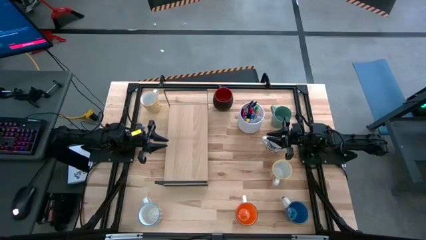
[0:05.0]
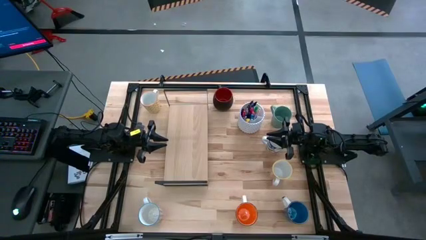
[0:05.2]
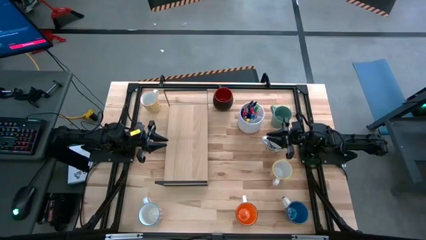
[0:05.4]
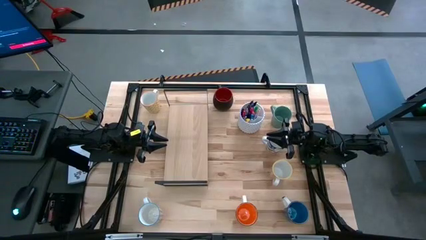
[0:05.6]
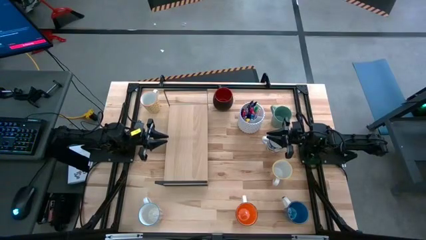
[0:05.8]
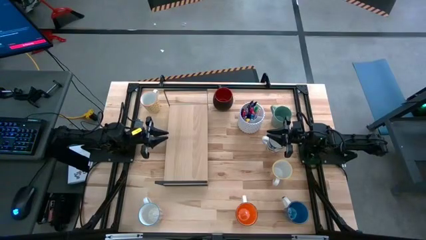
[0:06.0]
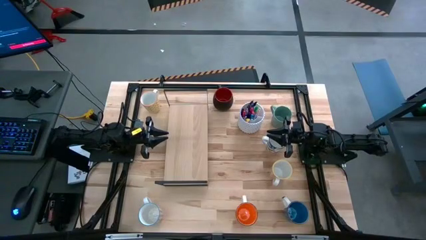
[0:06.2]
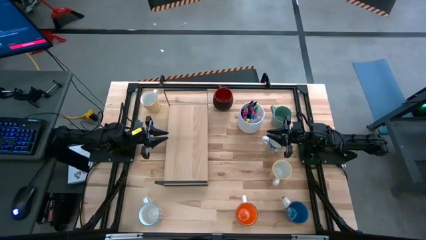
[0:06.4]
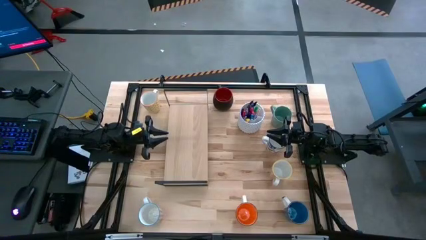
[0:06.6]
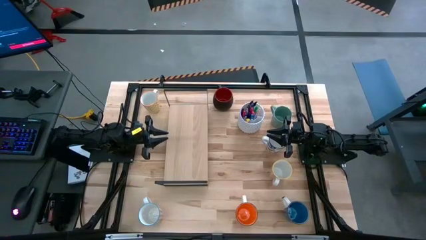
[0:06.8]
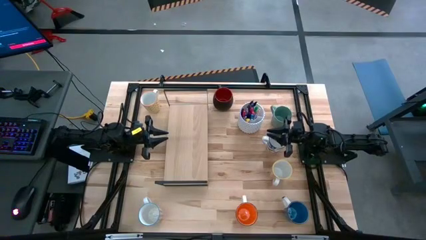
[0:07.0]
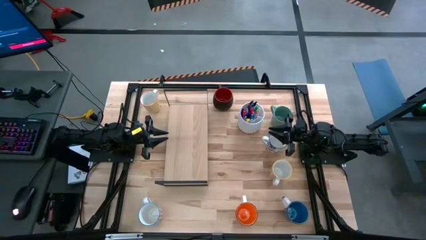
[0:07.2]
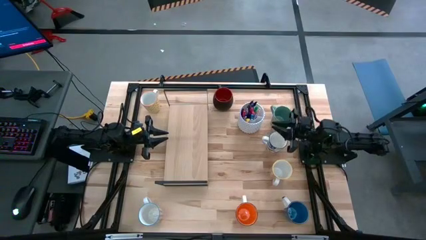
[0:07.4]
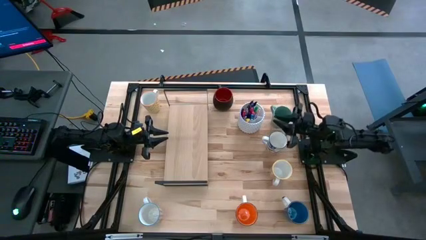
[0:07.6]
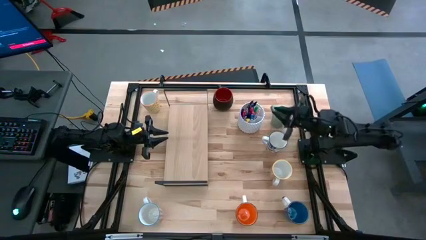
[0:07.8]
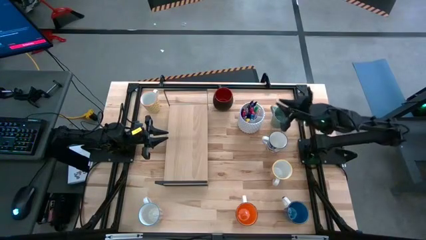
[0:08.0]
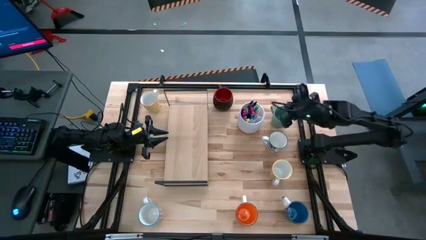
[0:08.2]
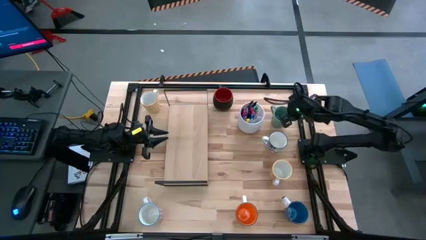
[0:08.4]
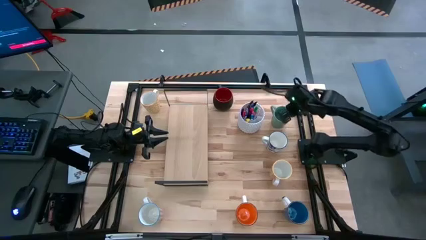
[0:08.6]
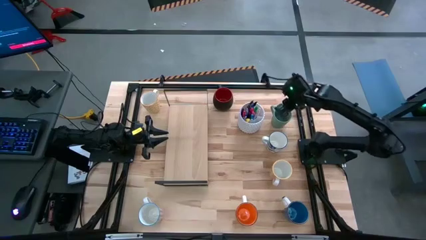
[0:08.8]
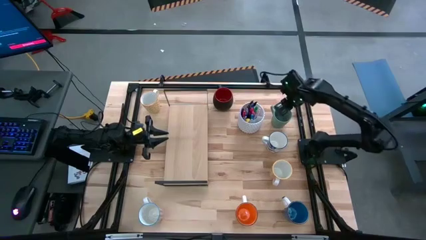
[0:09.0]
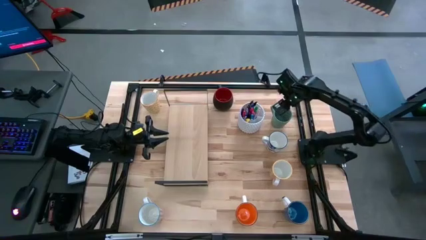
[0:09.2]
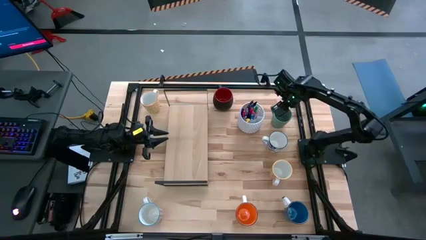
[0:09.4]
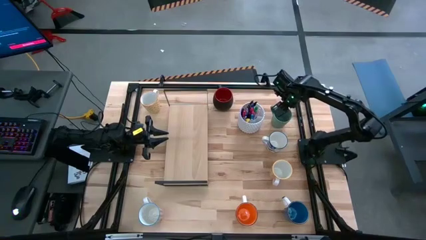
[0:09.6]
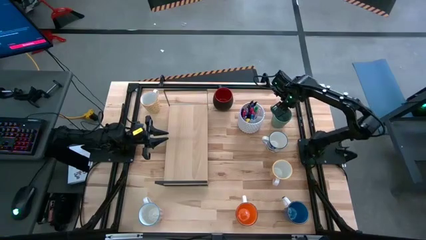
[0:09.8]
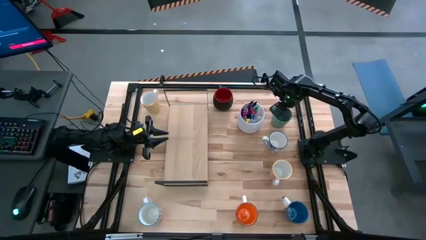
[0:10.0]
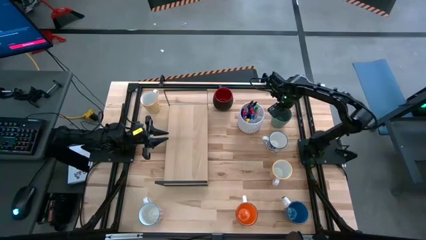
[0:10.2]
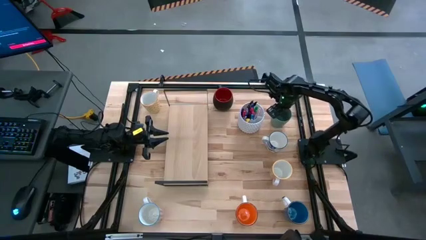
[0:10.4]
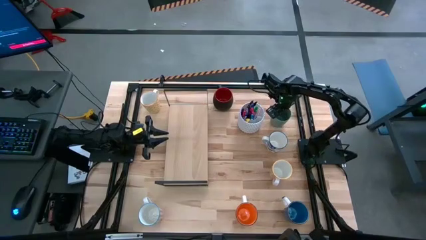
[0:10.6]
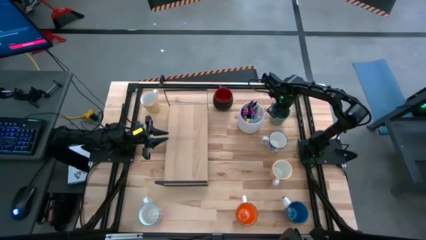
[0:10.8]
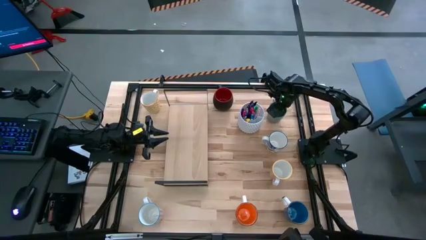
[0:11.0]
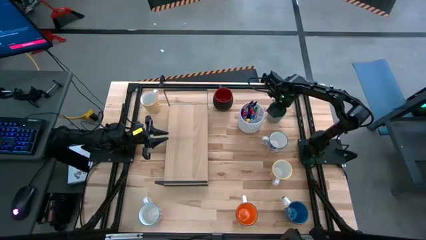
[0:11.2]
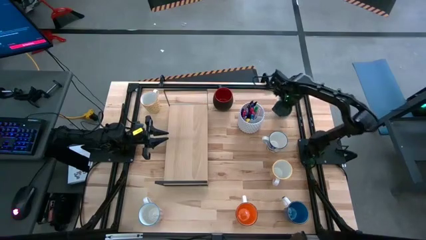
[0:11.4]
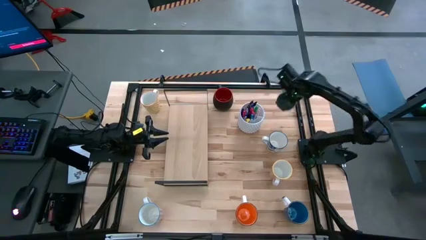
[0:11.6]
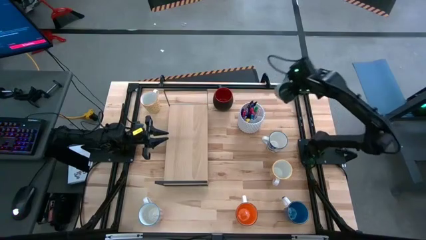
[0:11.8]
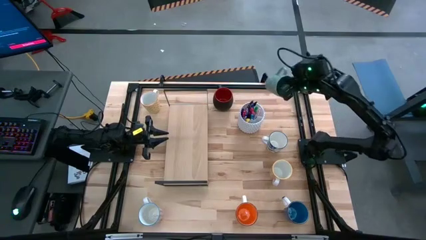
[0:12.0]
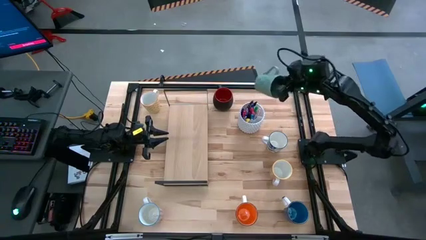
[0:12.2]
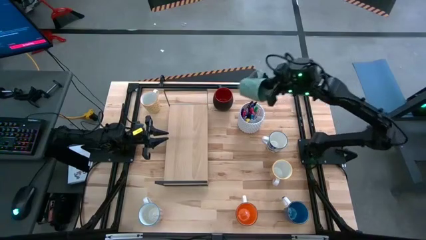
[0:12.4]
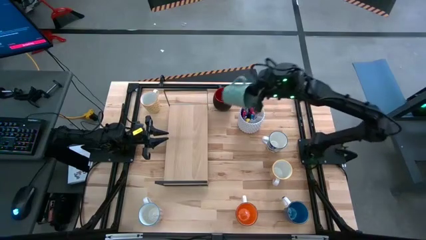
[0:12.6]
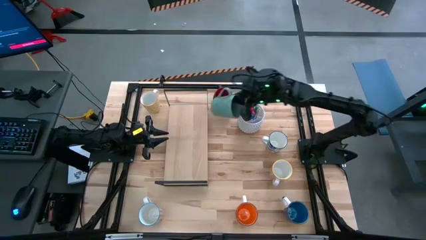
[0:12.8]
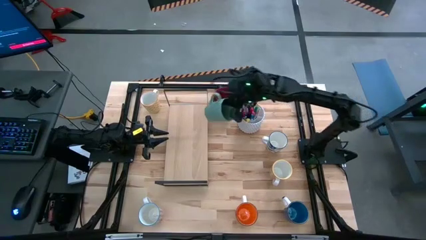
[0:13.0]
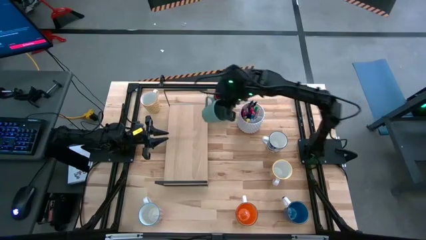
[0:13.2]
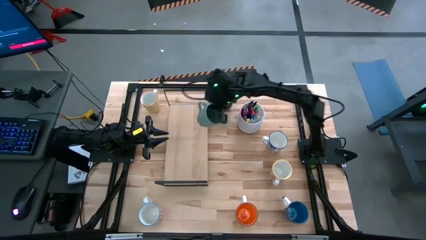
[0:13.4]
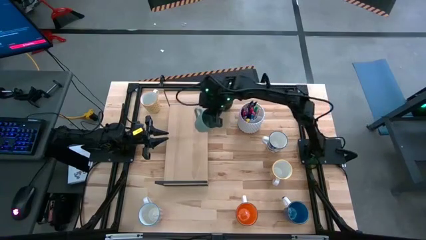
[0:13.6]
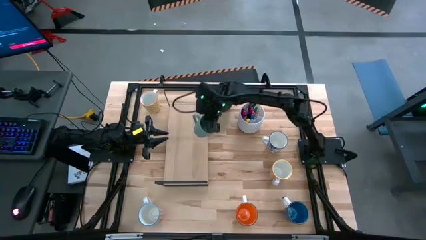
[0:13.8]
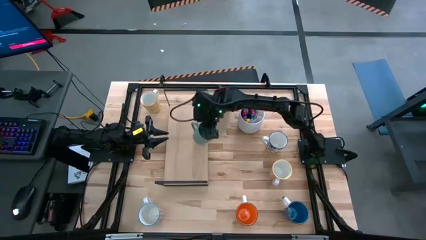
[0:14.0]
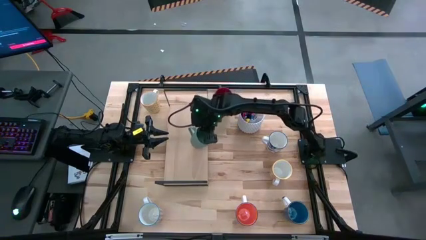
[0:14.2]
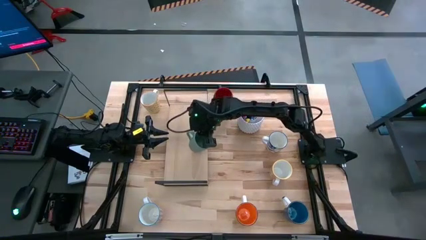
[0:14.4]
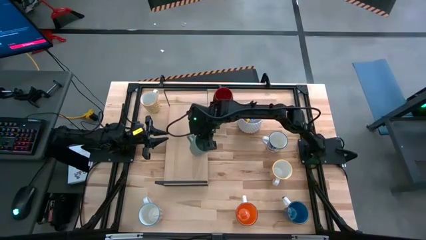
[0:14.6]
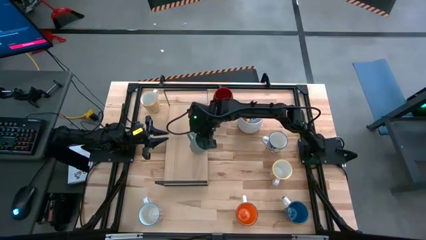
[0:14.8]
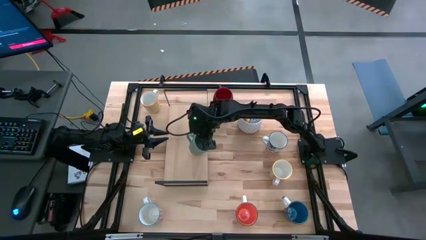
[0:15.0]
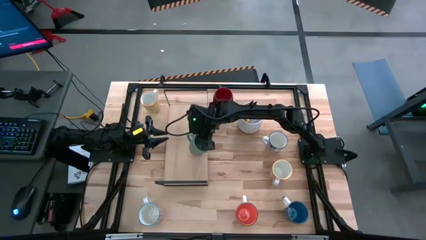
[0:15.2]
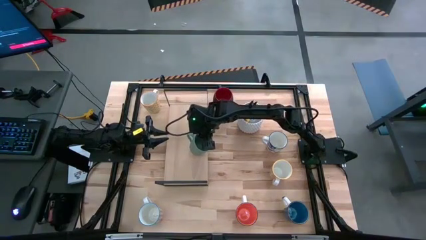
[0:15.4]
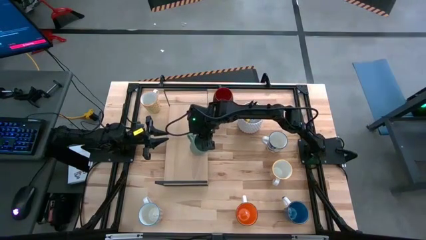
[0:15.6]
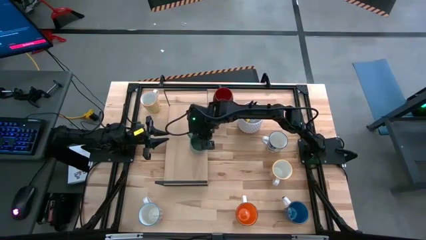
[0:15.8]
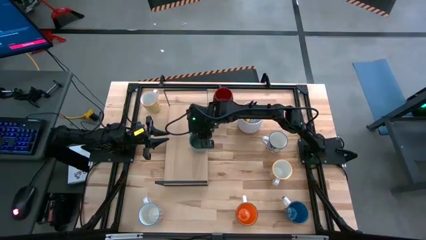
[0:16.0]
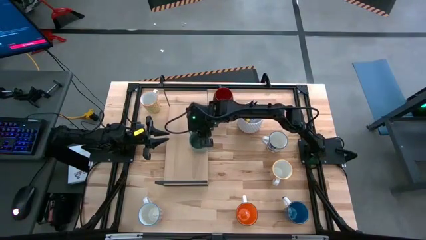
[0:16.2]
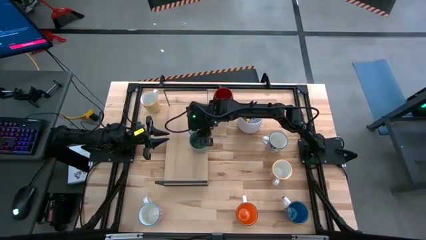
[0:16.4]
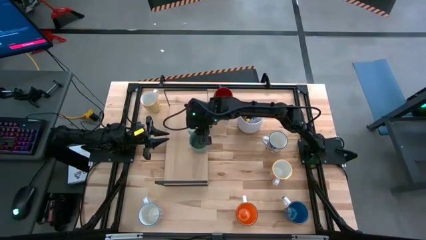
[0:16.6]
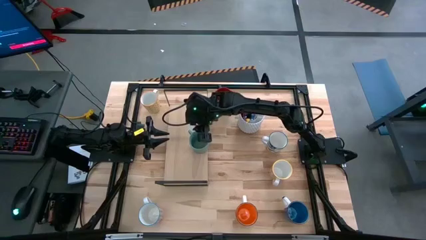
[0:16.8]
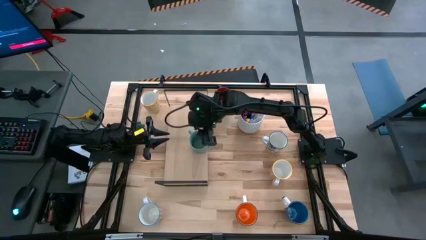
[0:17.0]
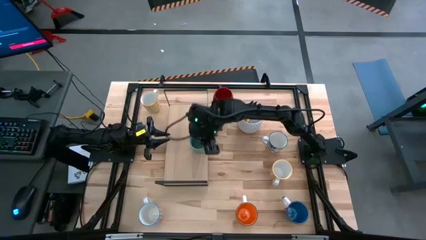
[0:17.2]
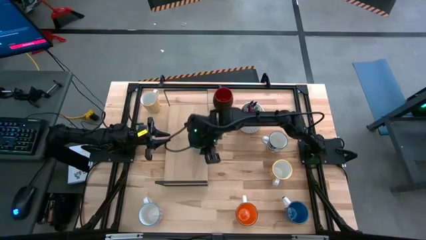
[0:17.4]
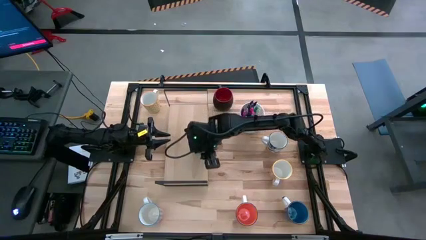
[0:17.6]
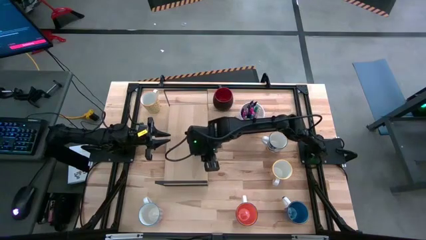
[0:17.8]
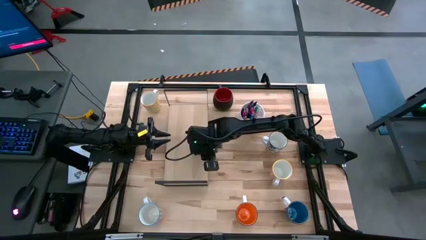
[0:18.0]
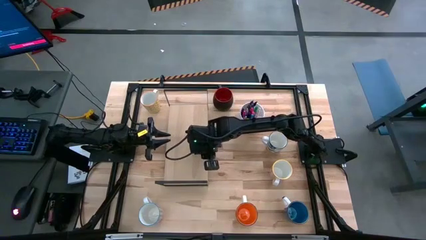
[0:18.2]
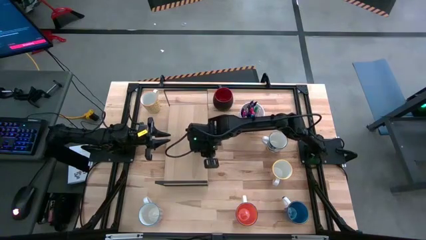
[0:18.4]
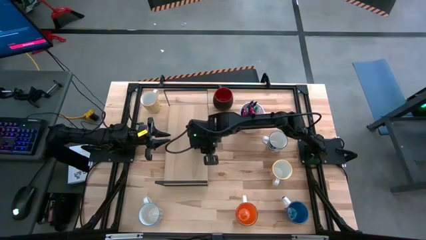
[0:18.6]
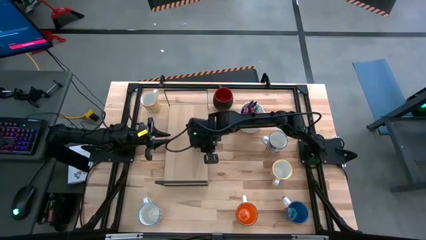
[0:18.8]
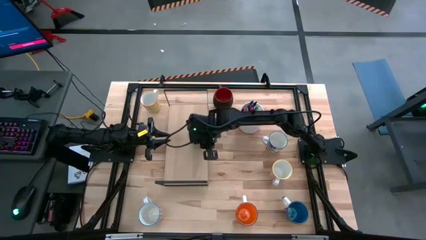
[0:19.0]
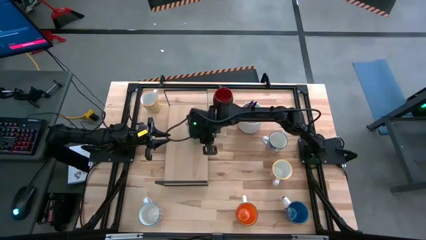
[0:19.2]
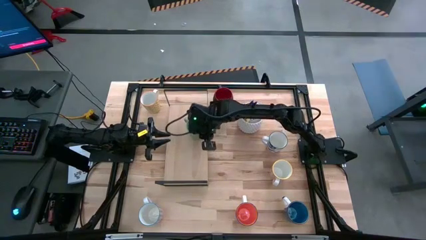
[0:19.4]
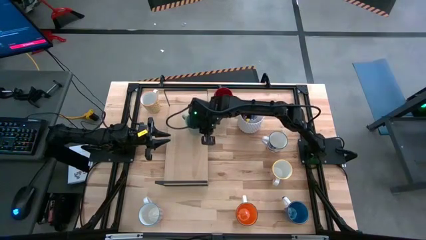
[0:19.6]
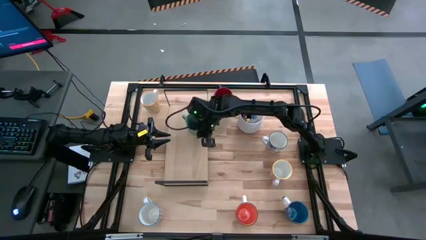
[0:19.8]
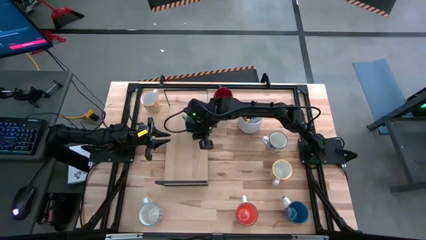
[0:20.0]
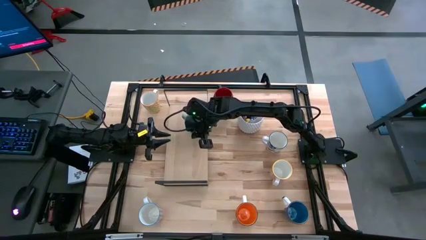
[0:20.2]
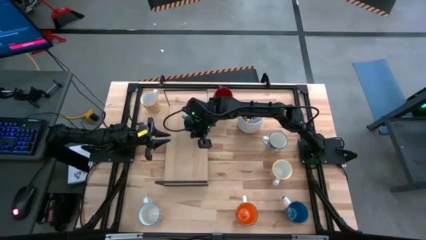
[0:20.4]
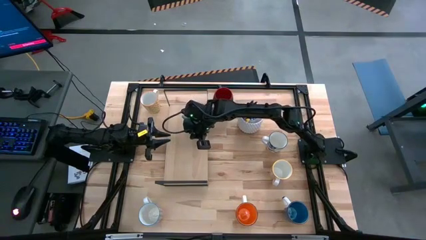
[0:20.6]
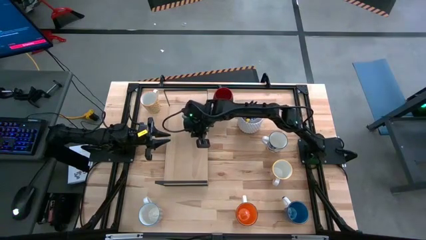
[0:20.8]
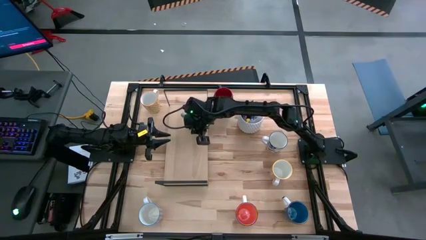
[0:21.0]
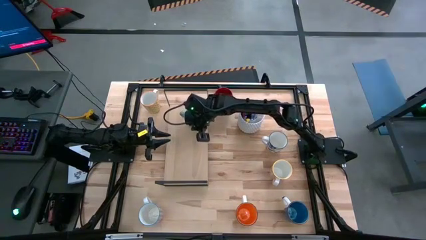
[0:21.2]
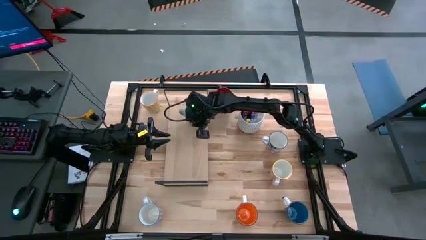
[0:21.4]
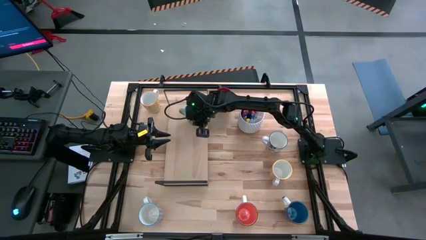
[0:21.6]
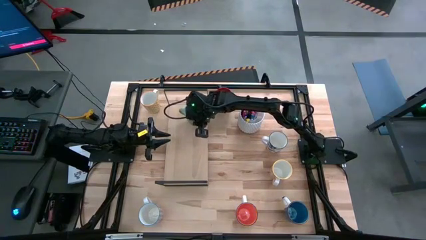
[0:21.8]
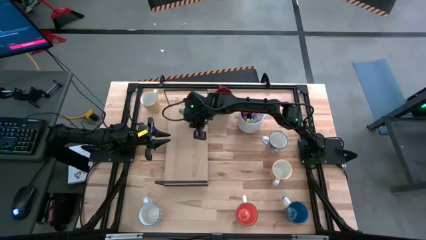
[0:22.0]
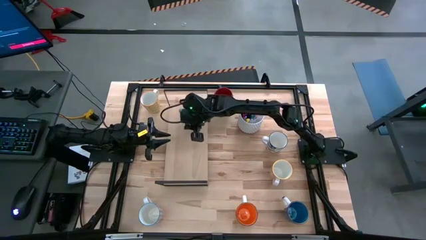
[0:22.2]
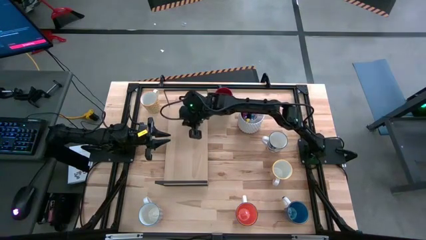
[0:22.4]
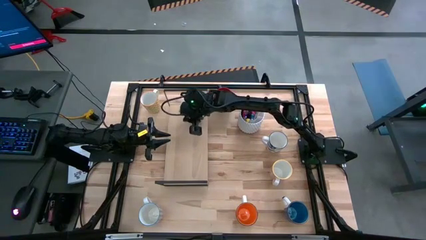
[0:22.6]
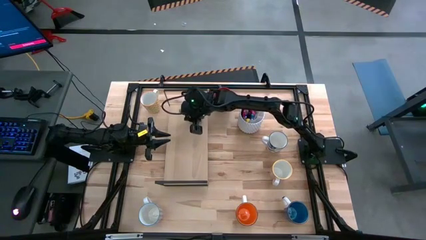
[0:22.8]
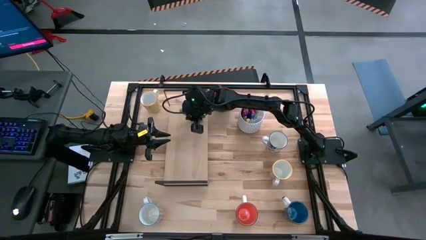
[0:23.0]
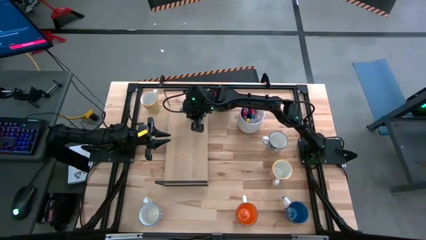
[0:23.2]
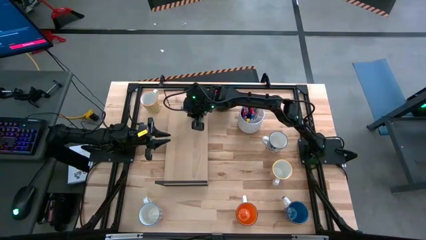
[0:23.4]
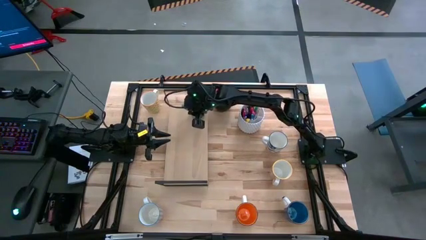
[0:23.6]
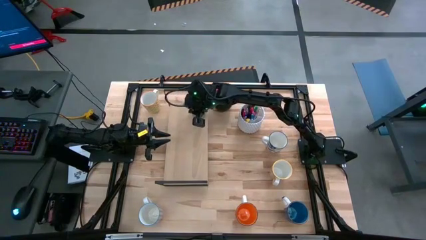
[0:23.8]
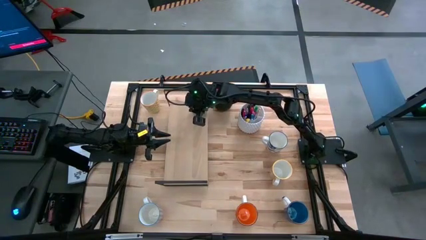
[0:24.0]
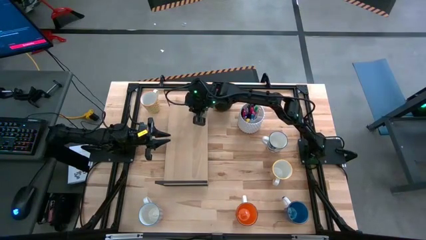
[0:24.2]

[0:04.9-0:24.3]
Task: Place coffee mugs
Put the green mug on the shelf
